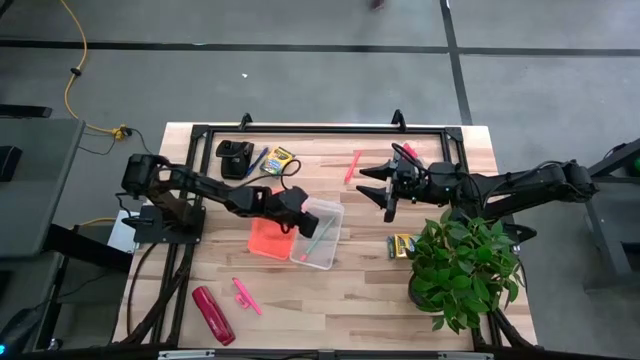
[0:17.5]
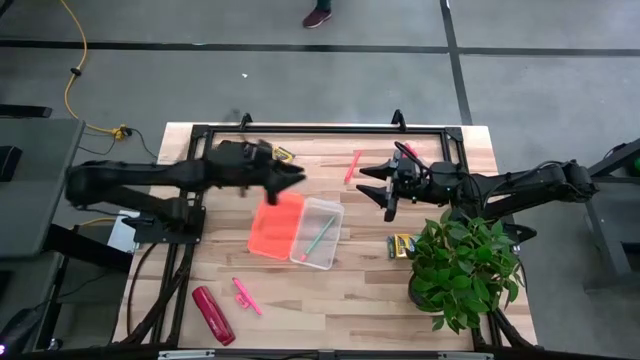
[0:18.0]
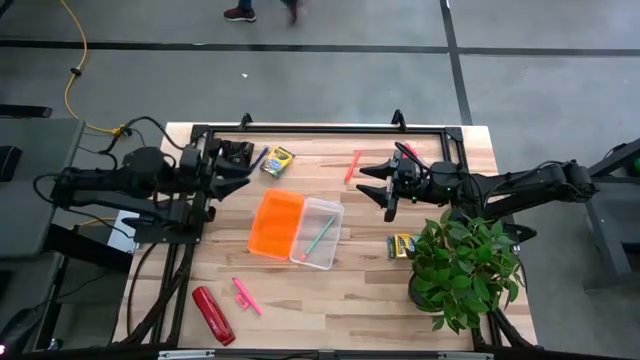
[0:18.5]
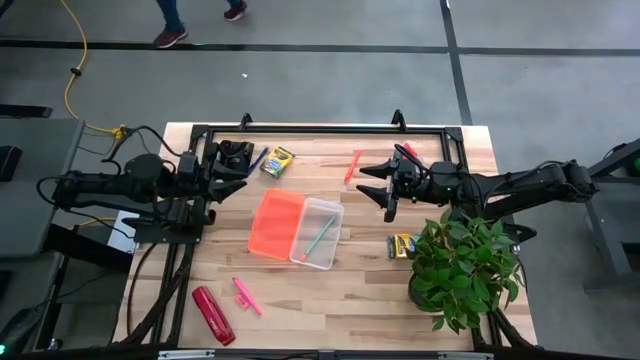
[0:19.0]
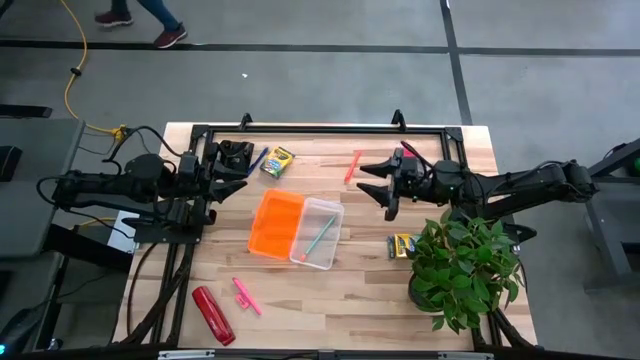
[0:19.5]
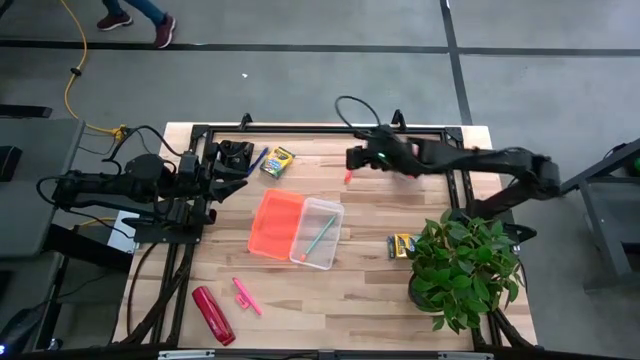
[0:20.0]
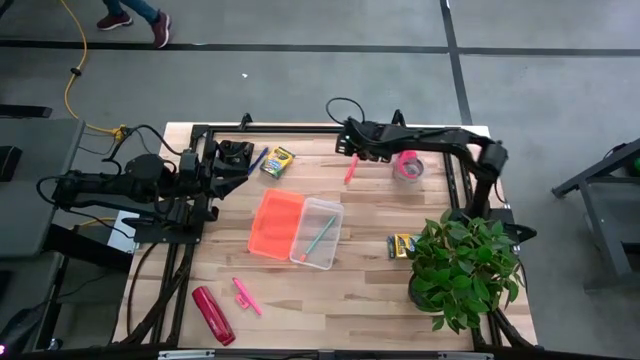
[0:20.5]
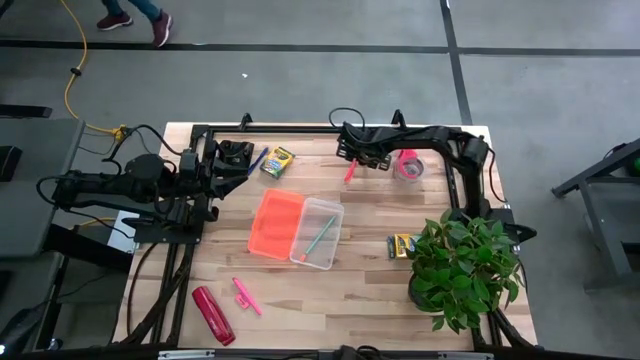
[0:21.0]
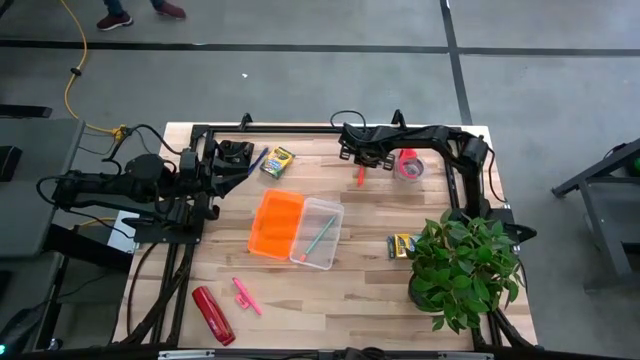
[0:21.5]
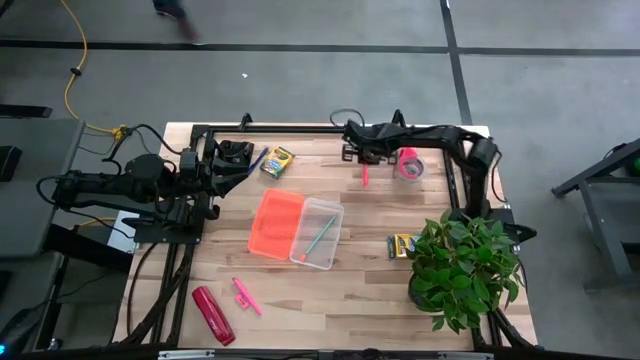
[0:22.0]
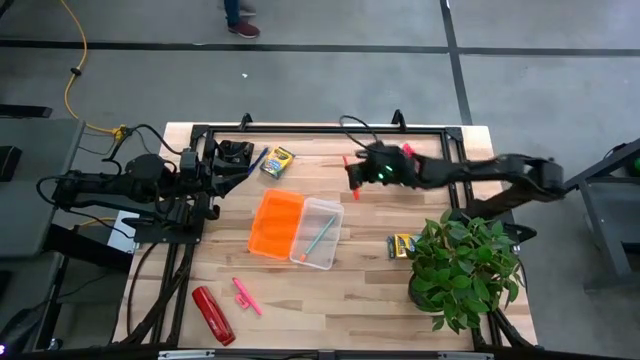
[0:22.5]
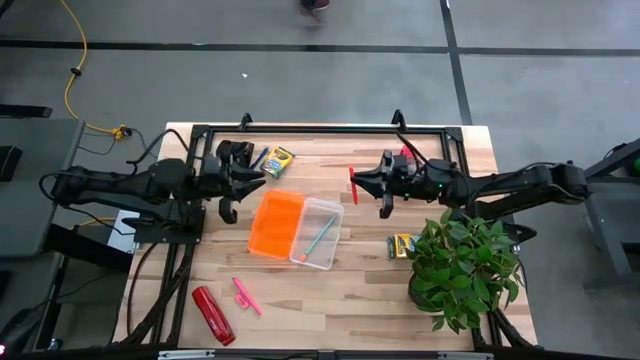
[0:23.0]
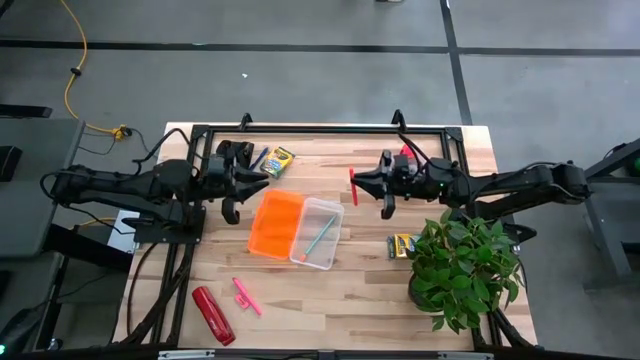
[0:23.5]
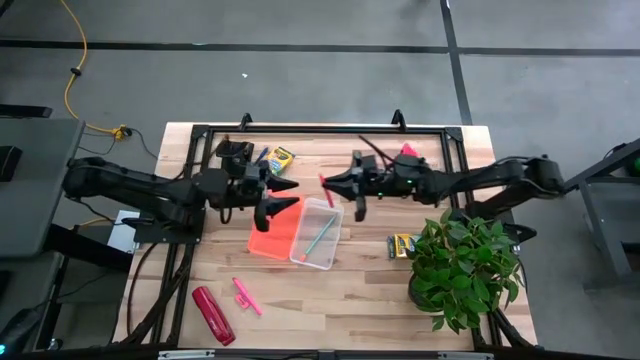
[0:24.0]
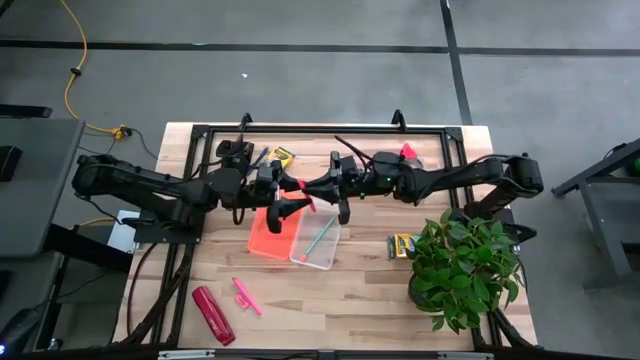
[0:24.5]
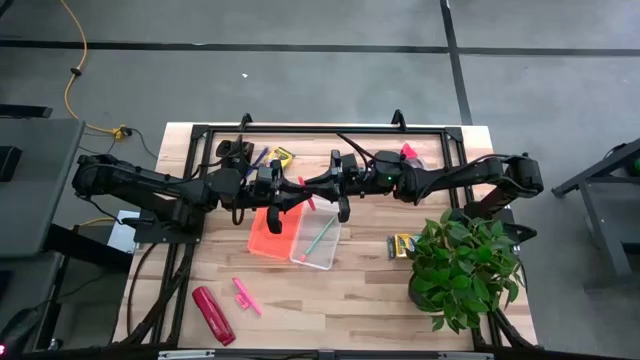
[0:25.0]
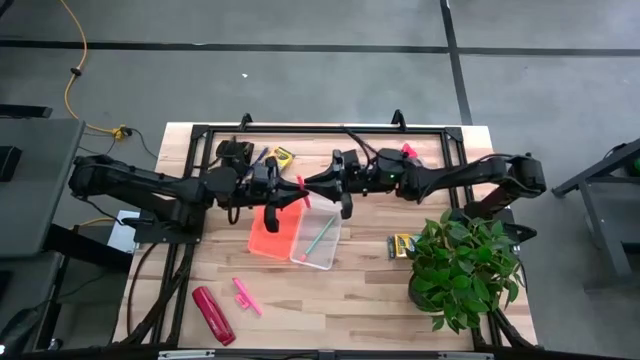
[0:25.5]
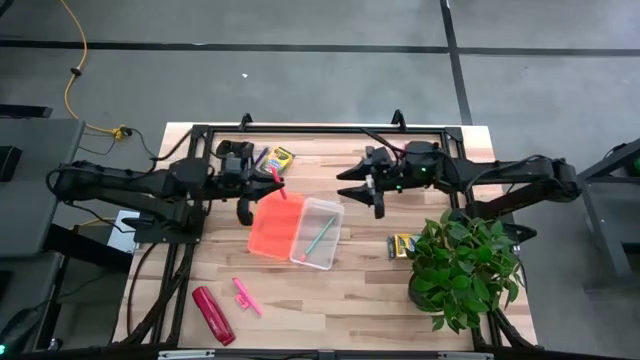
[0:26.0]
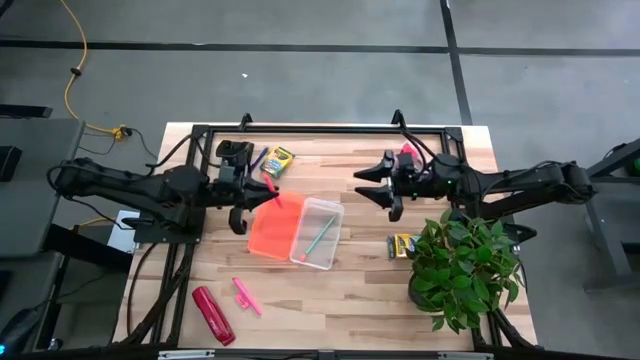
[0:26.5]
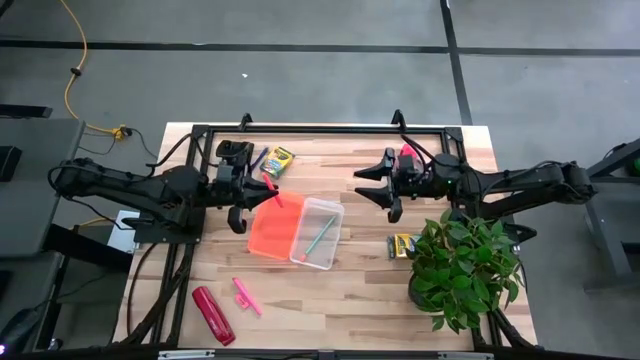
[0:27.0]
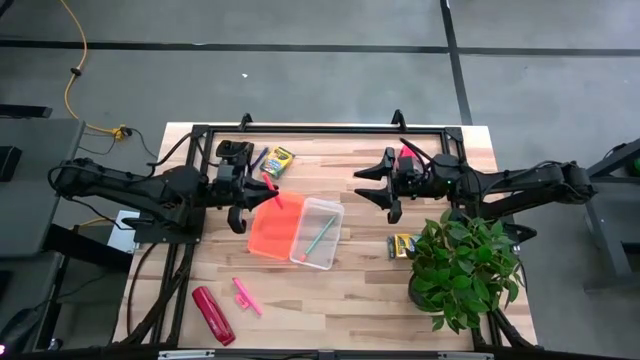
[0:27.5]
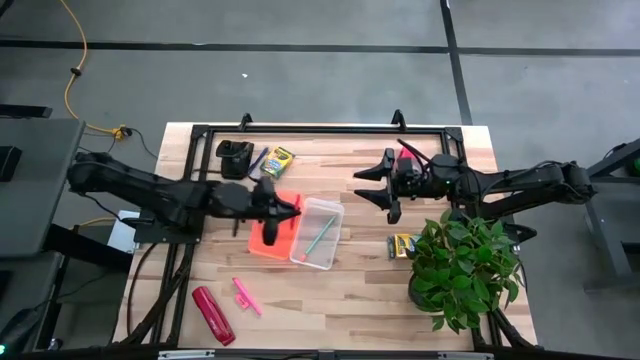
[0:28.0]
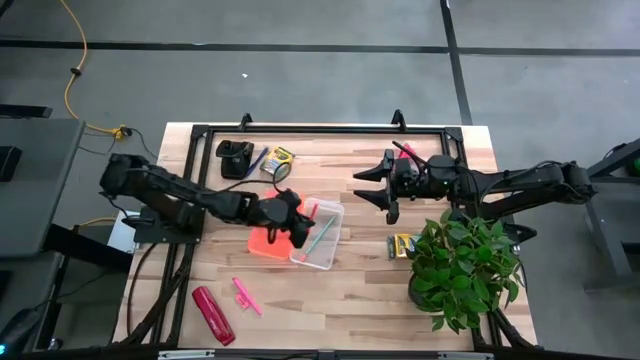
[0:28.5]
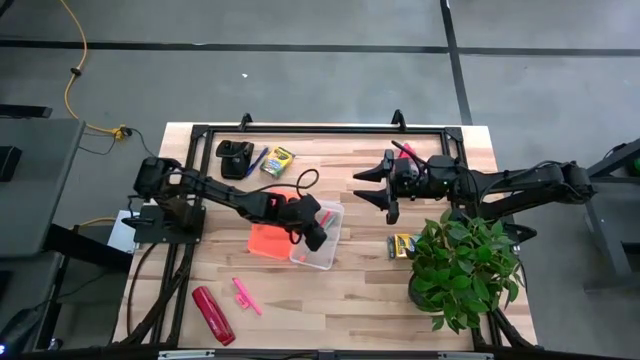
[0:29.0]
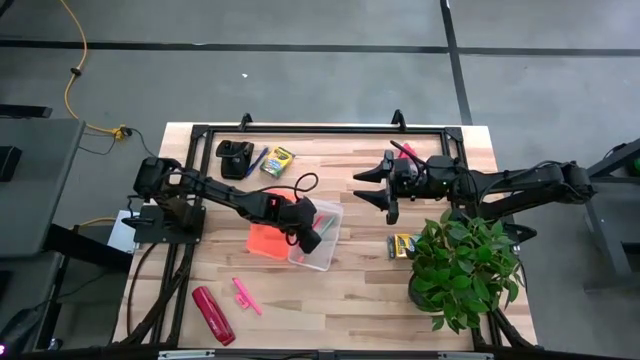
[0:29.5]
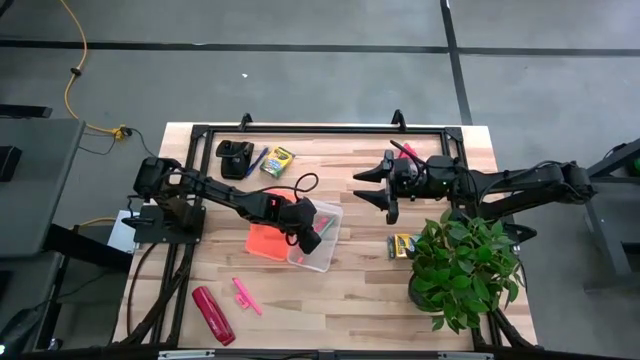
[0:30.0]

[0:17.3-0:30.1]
Task: Pack school essentials
Put the orange pen in the supply box

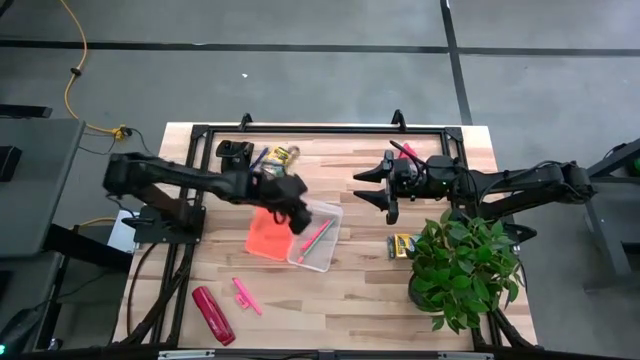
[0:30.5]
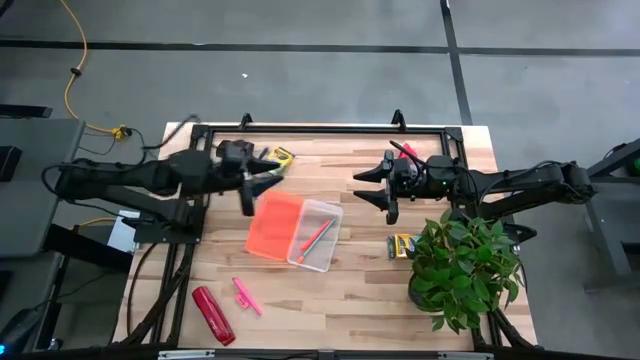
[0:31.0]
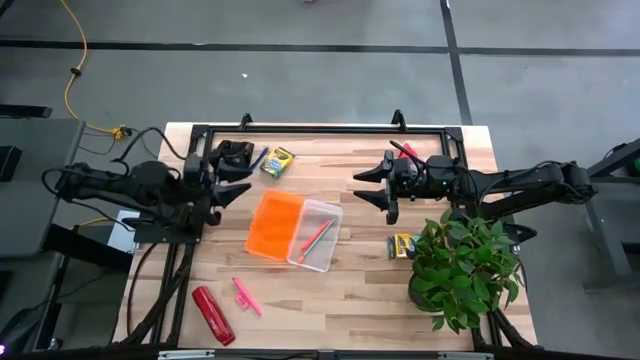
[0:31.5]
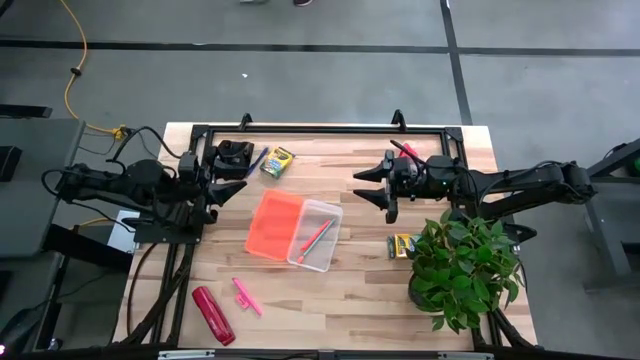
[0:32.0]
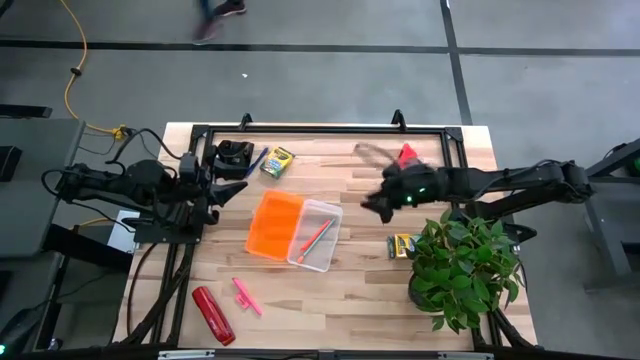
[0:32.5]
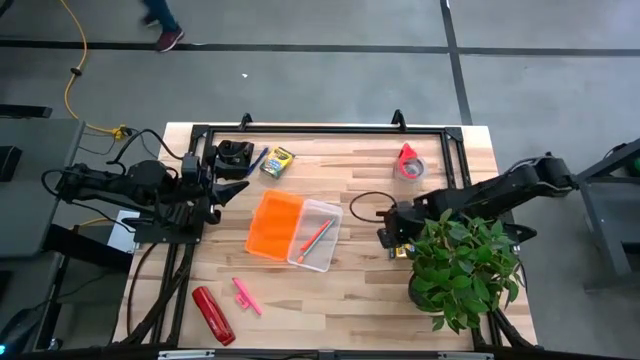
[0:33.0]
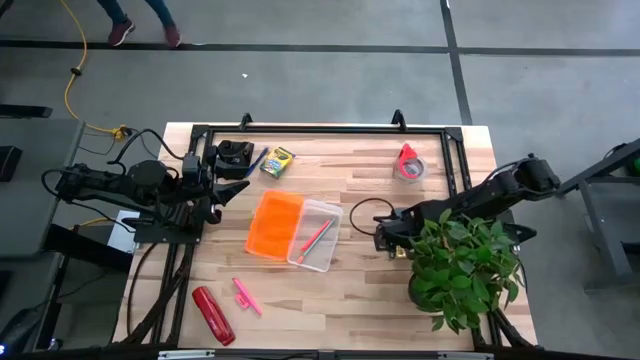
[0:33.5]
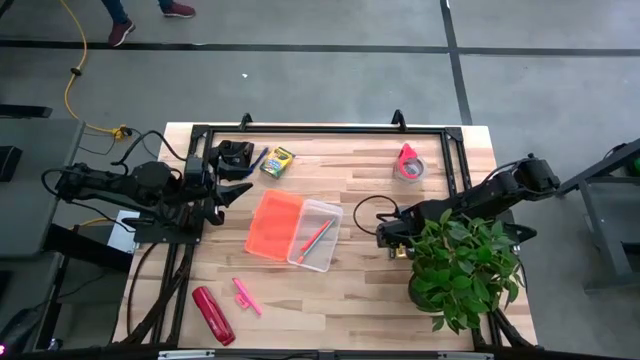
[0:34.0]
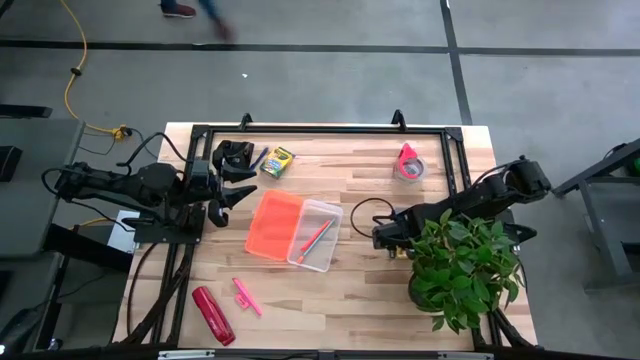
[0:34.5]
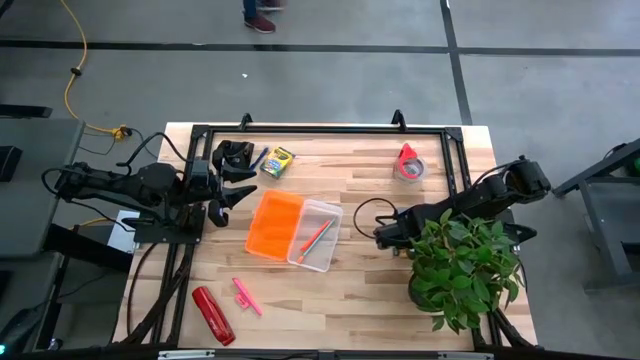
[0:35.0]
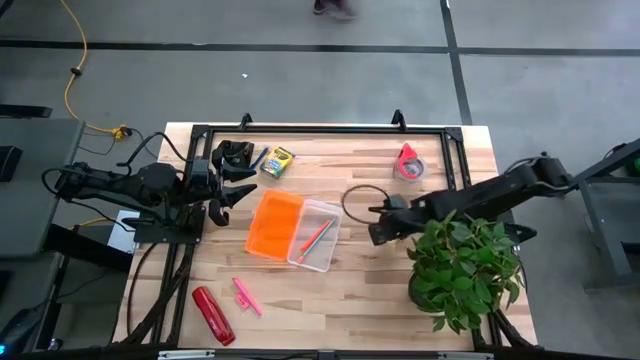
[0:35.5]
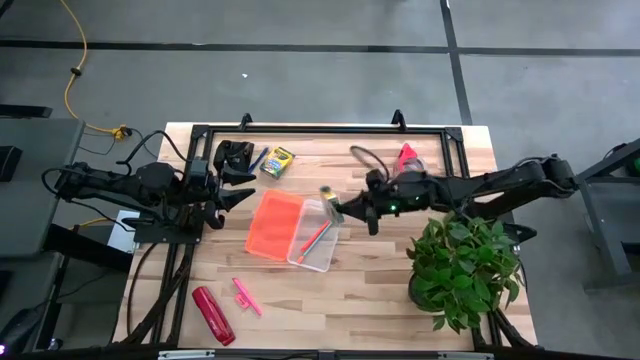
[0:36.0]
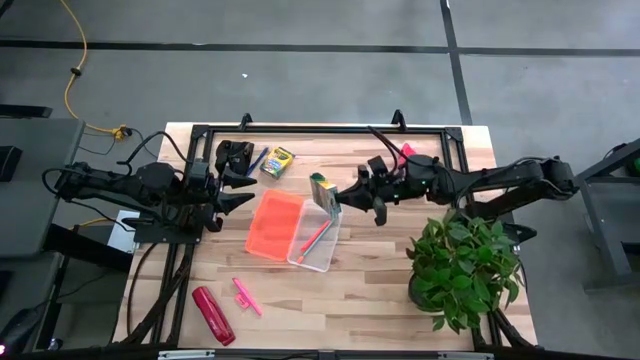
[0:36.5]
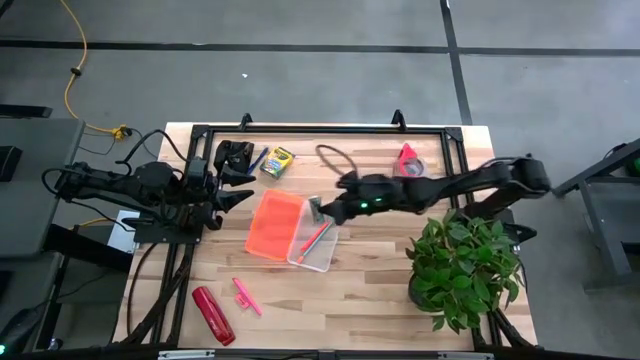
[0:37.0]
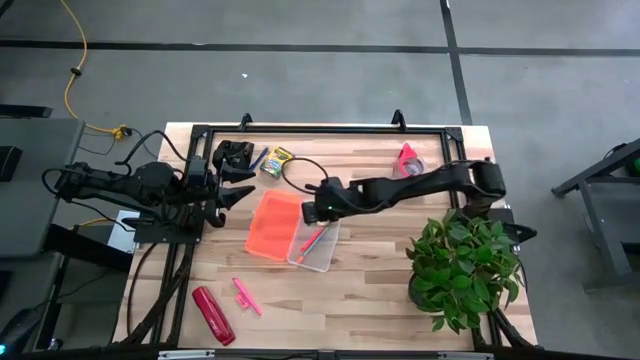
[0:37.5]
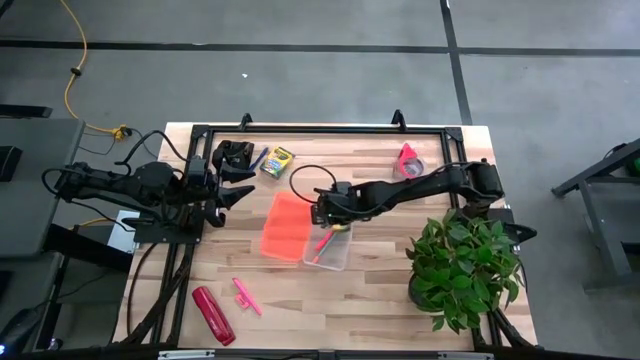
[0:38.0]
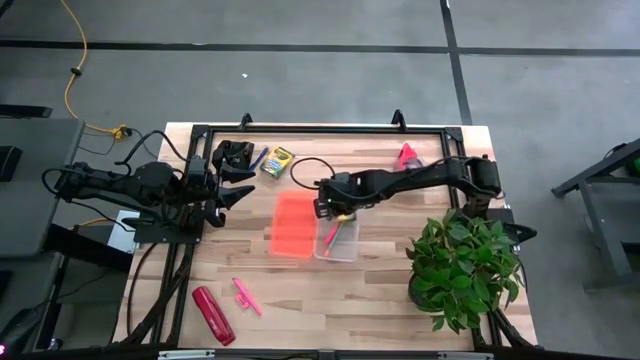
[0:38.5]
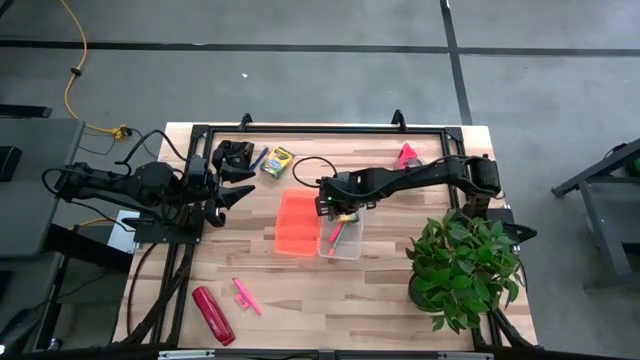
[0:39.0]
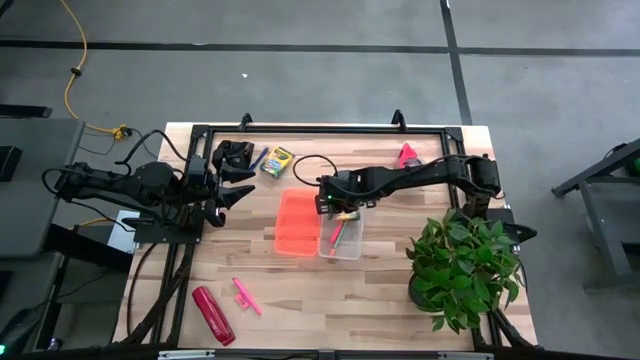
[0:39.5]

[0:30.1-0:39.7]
Put the bottom crayon box in the supply box
